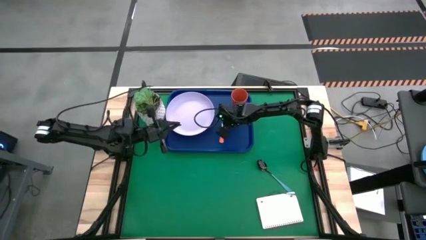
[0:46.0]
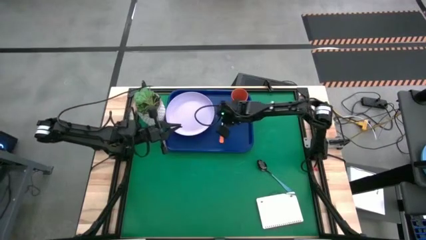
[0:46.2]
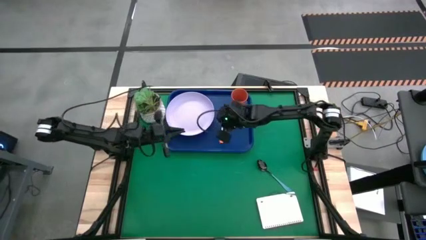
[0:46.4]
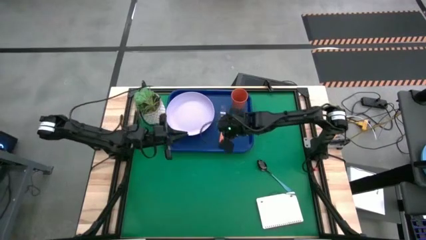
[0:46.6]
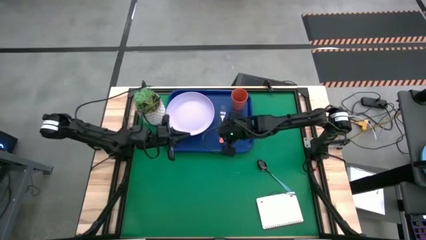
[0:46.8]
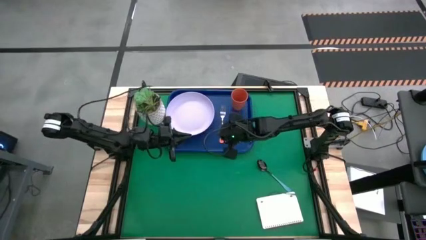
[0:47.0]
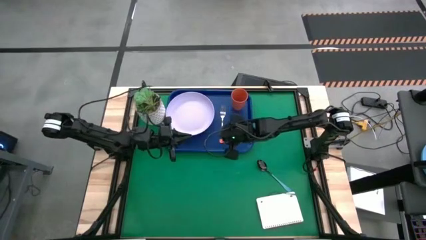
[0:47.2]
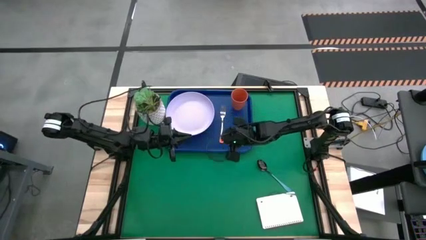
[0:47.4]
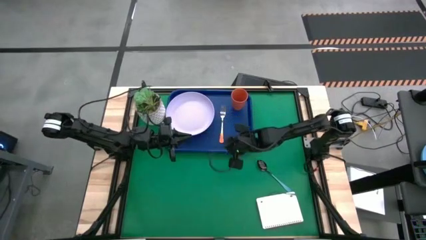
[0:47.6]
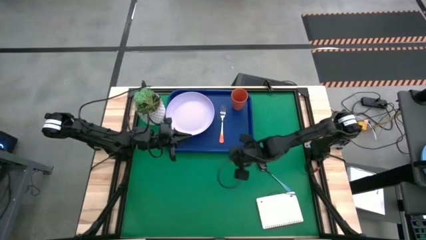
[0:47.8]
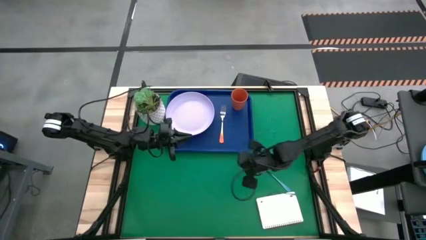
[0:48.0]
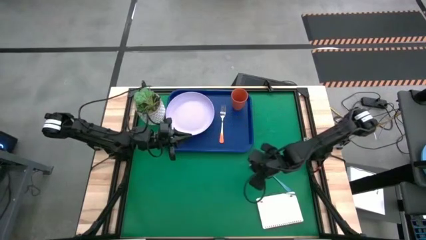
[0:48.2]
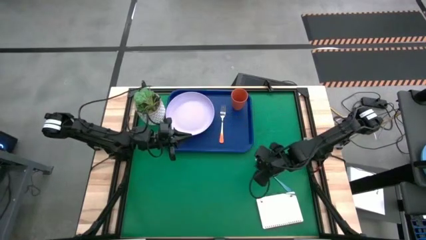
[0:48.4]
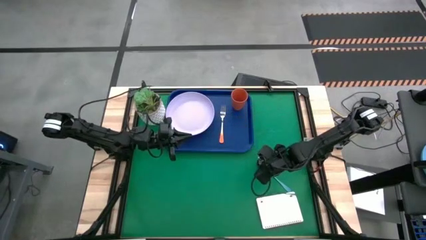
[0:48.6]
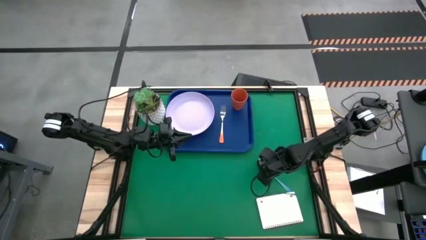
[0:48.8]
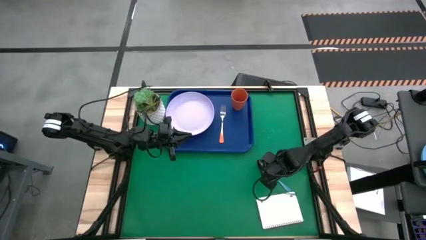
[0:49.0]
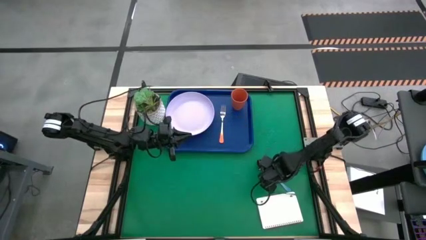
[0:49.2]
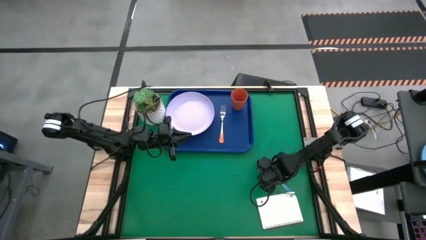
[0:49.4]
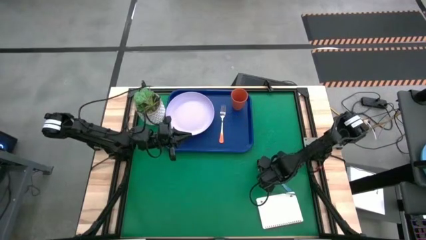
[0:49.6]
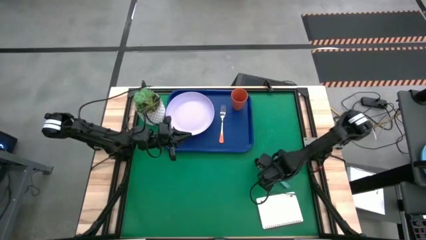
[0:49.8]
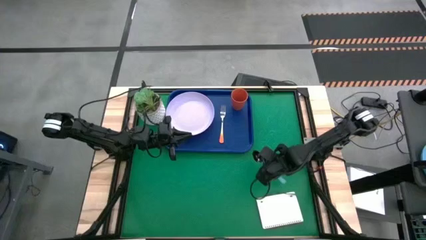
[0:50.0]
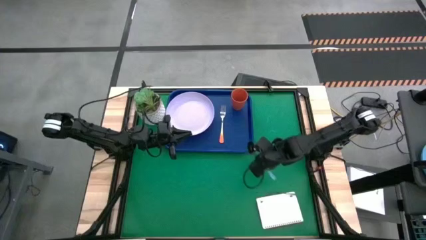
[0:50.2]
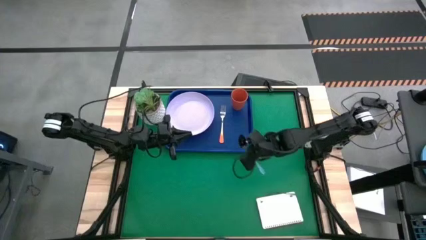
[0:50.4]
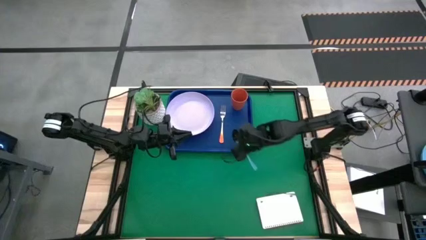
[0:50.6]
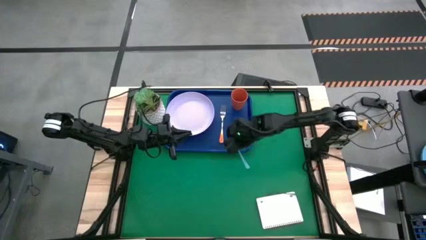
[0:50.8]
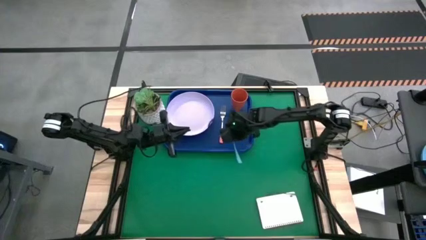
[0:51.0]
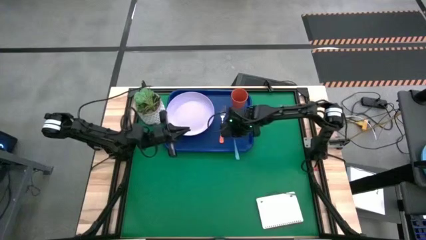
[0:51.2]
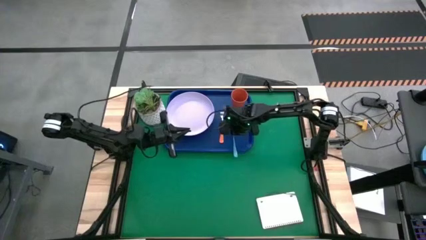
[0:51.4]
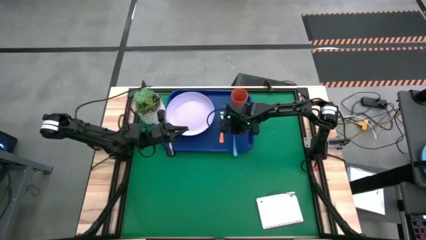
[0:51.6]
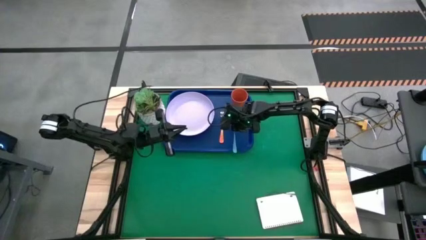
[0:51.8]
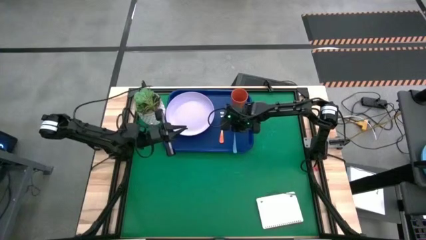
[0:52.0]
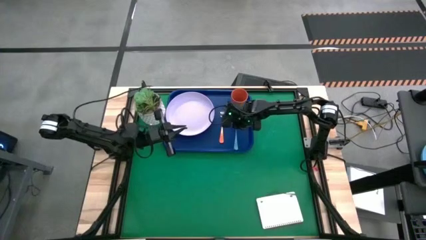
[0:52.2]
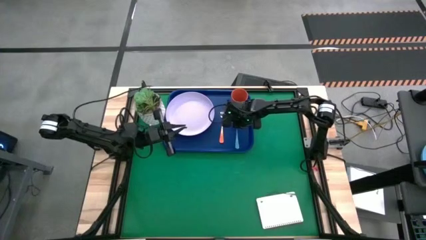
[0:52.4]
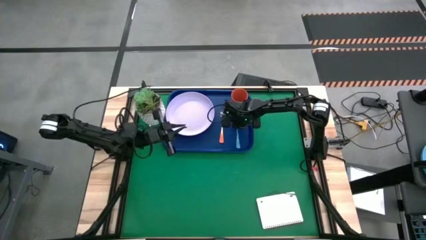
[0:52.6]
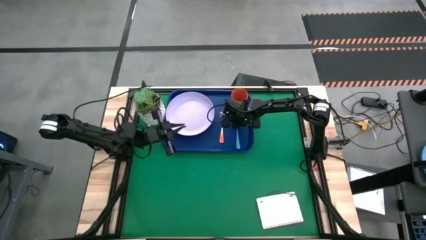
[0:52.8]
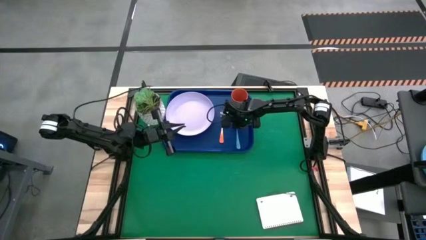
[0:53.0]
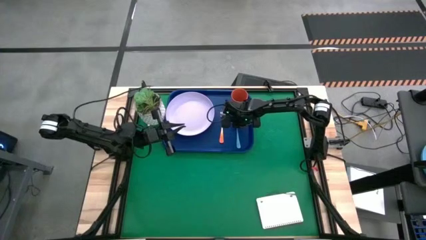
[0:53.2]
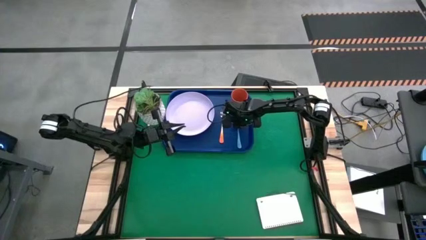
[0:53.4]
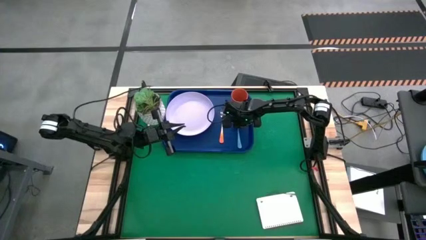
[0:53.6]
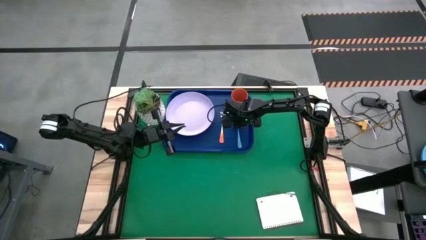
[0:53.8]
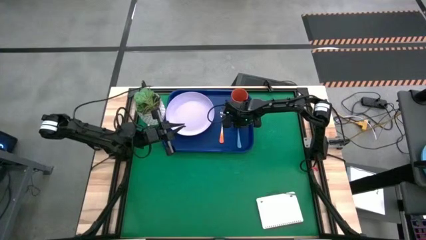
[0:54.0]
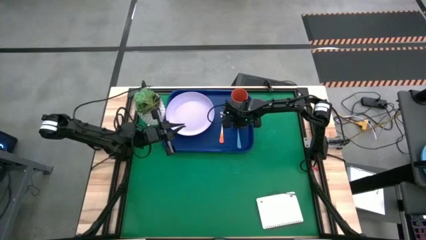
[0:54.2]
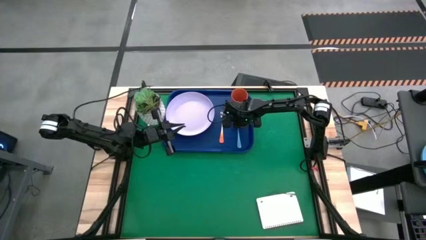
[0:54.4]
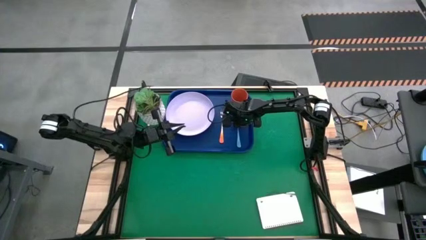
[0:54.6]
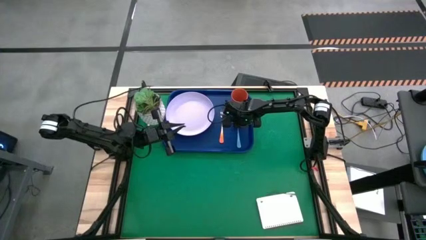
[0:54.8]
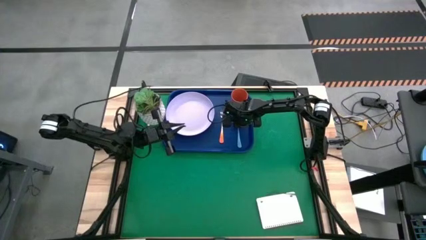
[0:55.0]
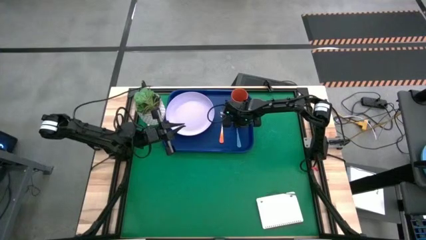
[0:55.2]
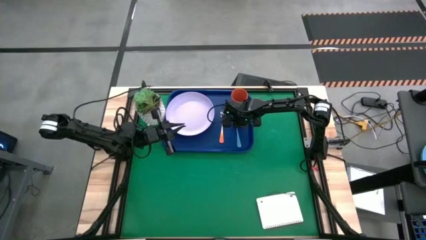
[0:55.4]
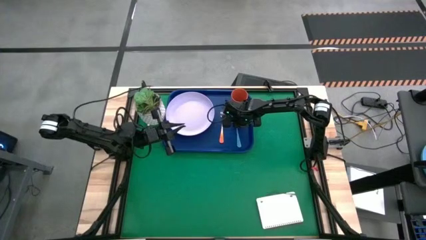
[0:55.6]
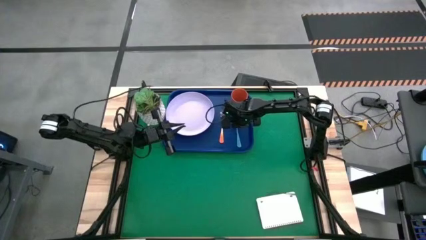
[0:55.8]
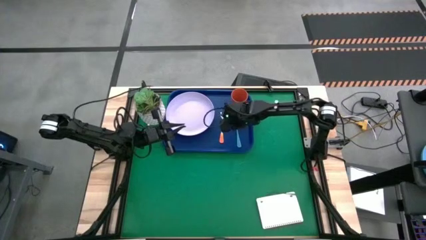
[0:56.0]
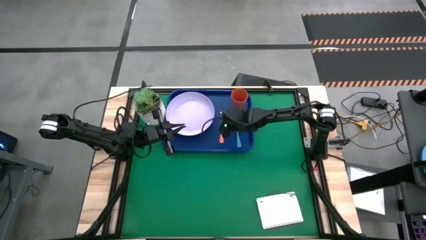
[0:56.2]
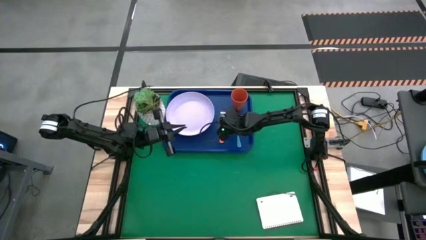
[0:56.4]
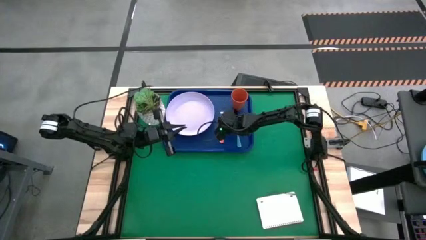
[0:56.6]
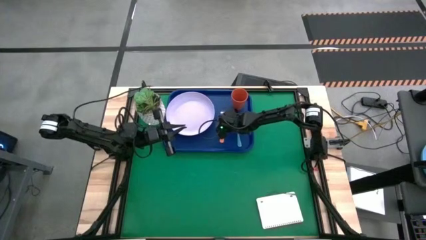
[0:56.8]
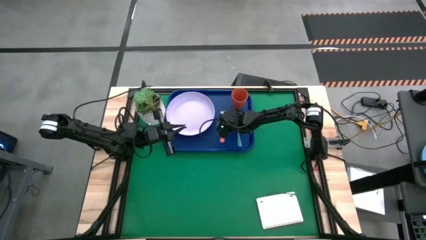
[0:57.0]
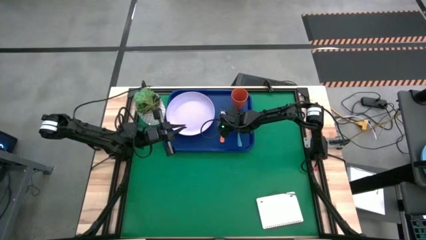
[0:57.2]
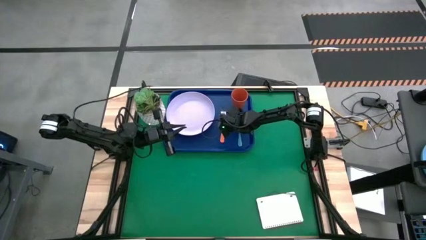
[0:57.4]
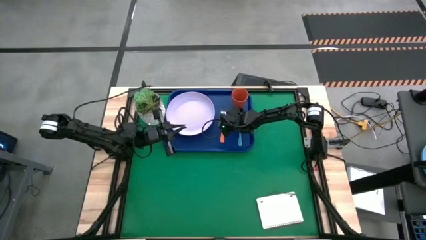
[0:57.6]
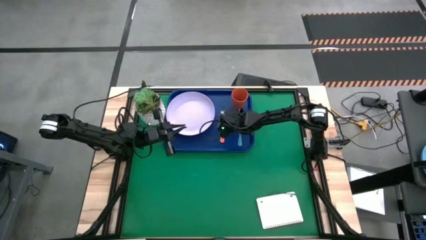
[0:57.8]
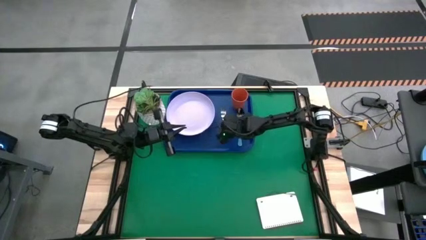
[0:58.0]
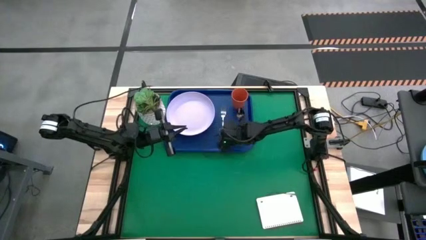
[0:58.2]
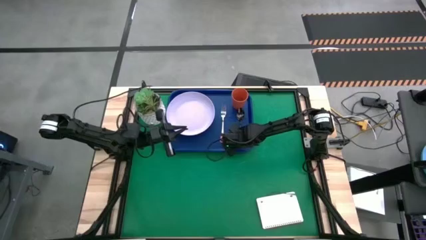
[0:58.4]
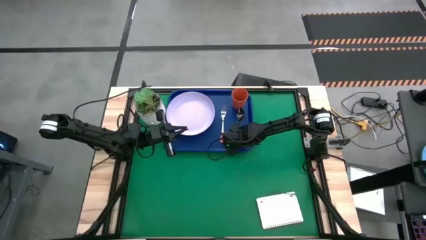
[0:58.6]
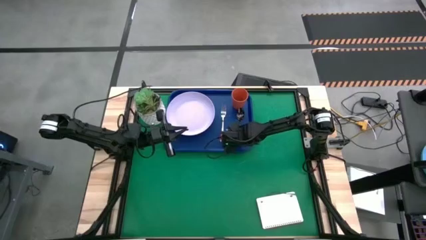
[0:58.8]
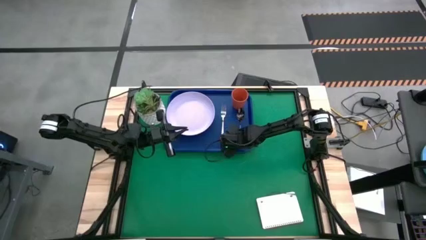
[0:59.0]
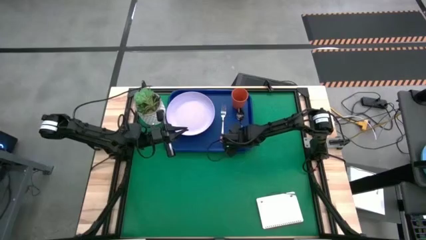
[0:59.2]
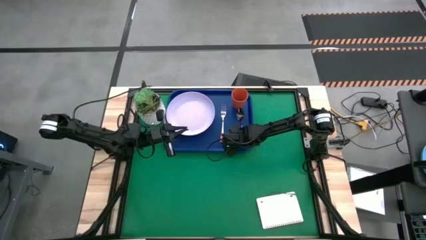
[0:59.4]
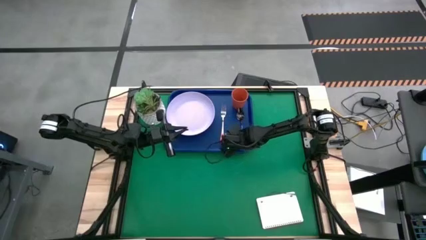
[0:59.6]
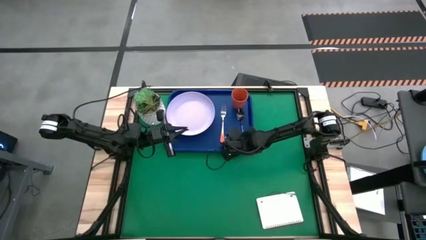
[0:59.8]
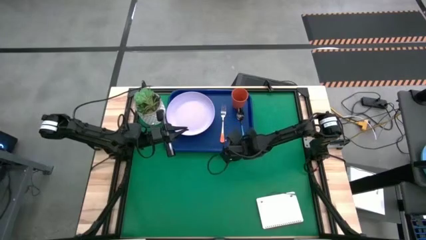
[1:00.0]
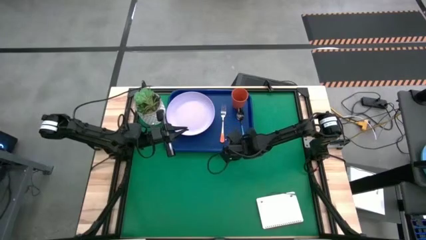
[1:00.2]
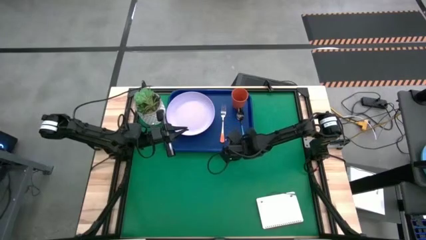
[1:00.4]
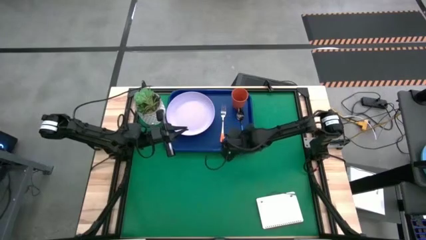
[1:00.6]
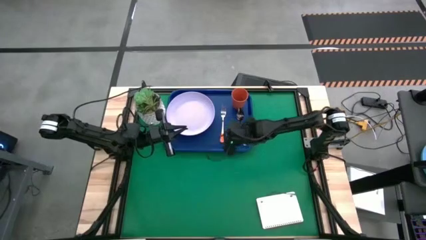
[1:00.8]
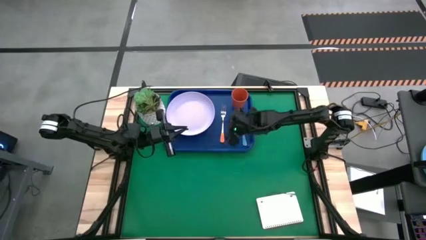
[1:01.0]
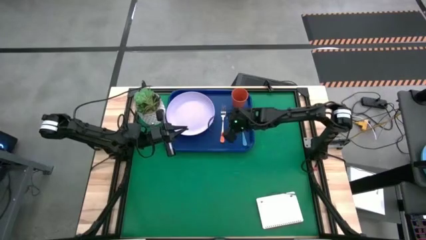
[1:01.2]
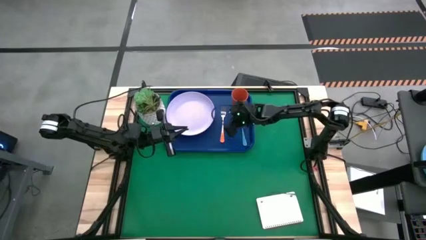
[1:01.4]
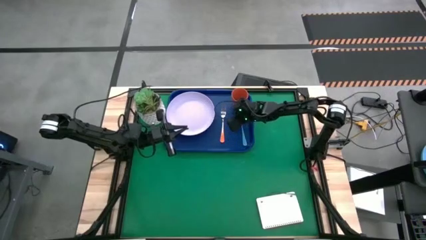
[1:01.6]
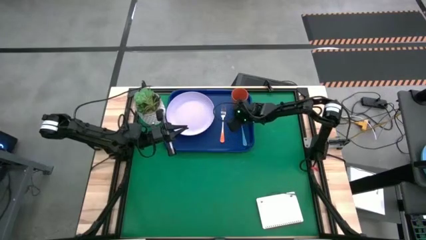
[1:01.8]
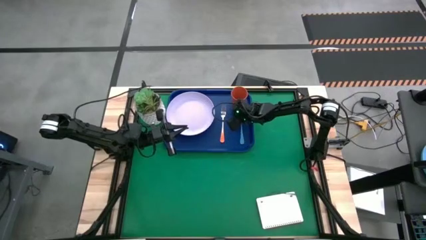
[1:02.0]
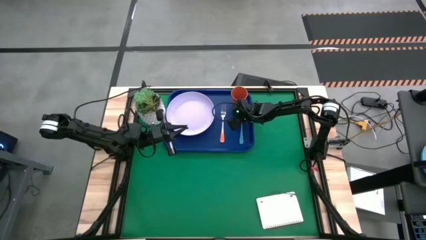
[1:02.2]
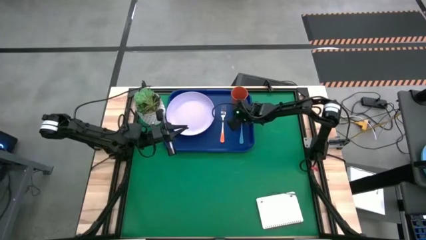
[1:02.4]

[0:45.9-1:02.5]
Task: Pick and place plate/cup/fork/spoon on tray
Put the blue spoon on the blue serving tray to the right of the orange fork
